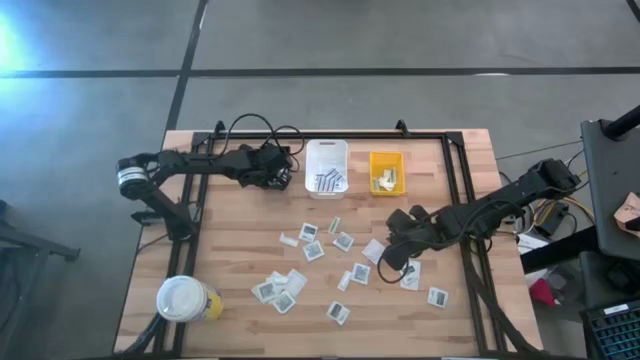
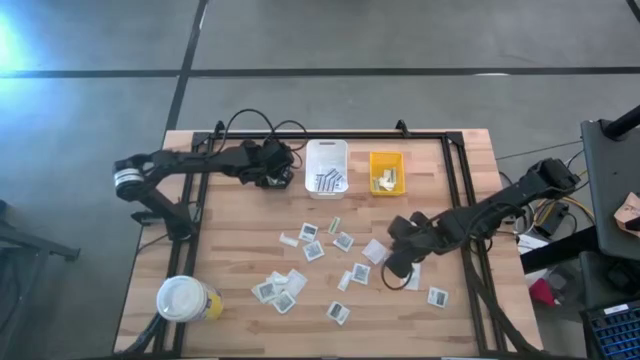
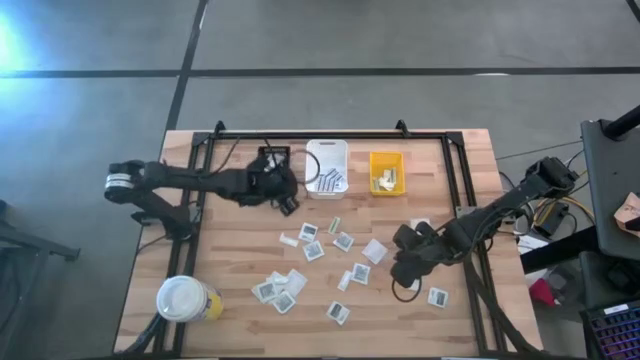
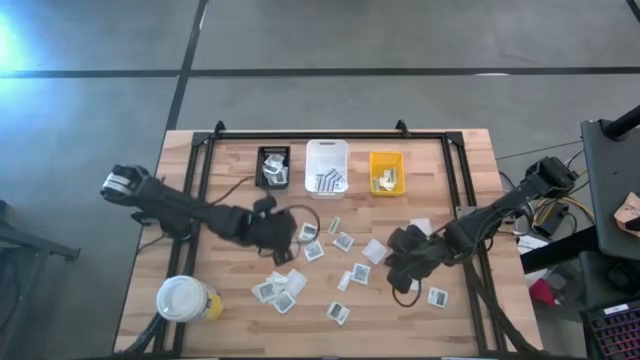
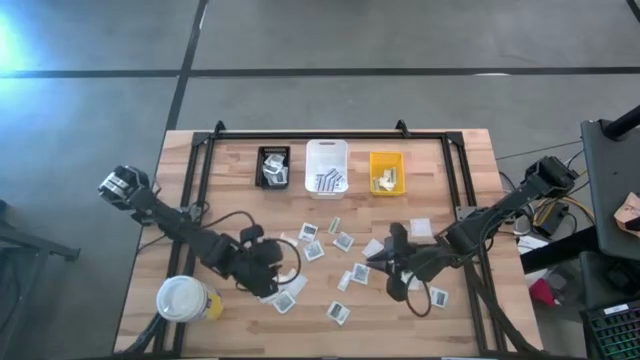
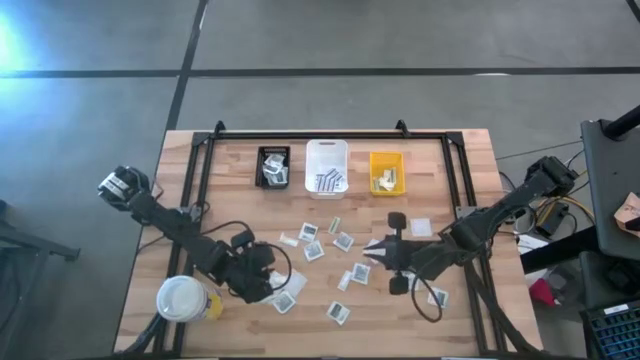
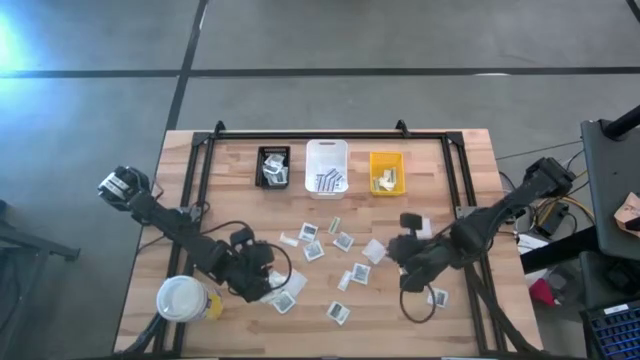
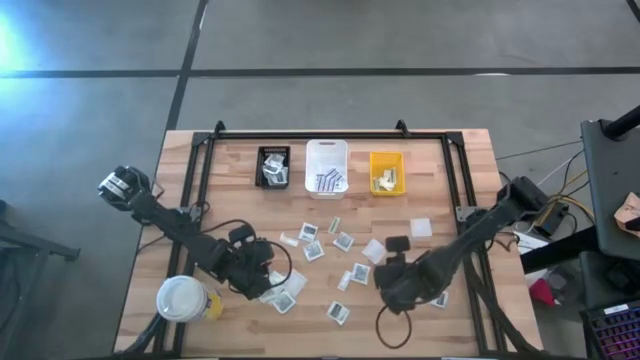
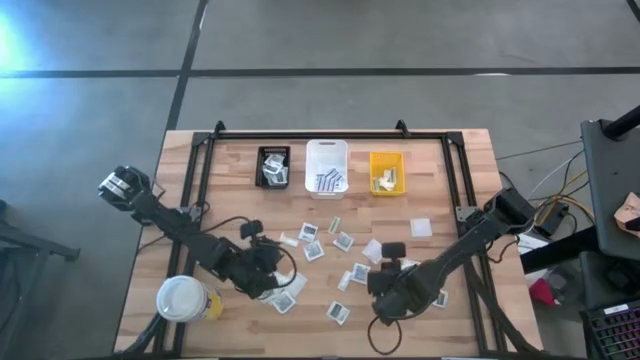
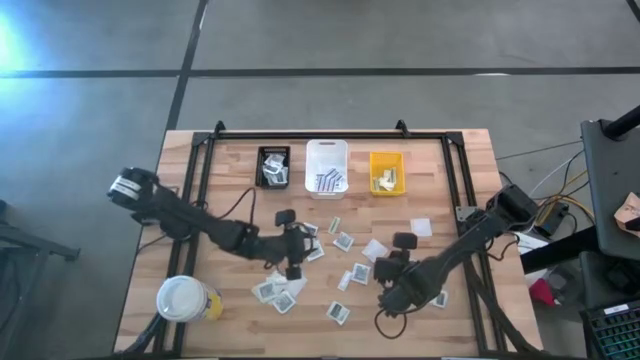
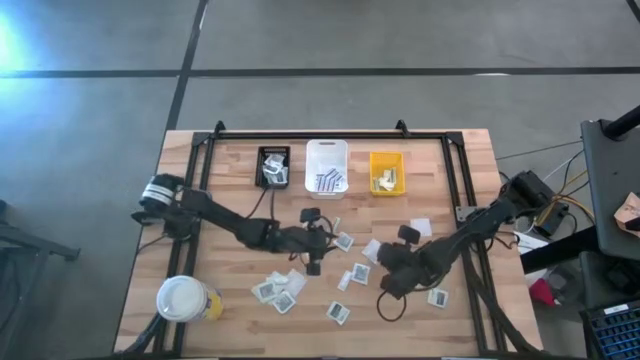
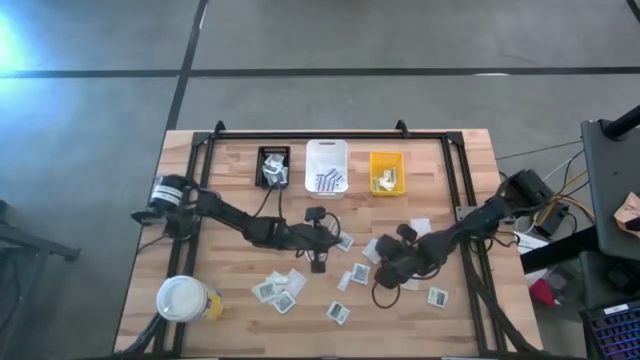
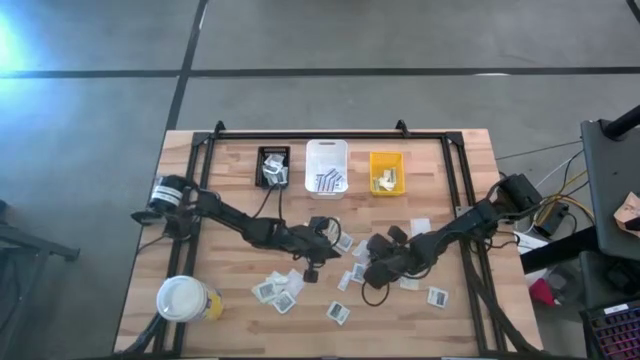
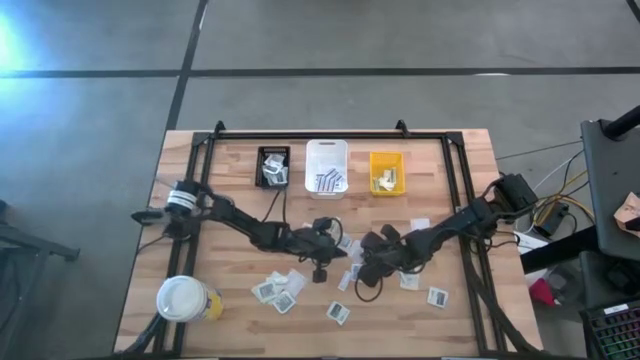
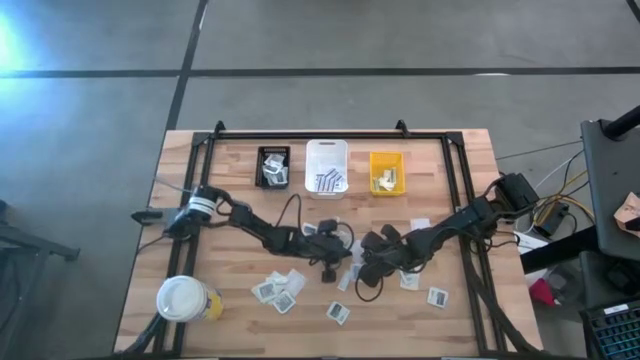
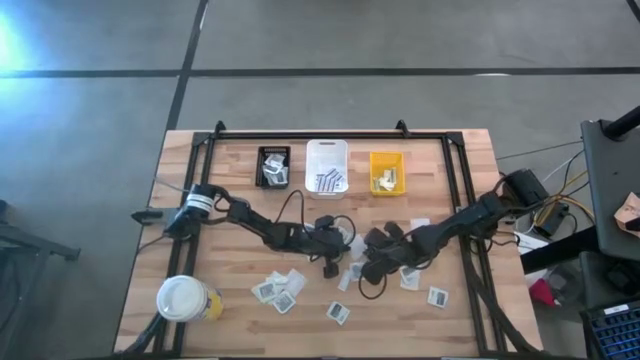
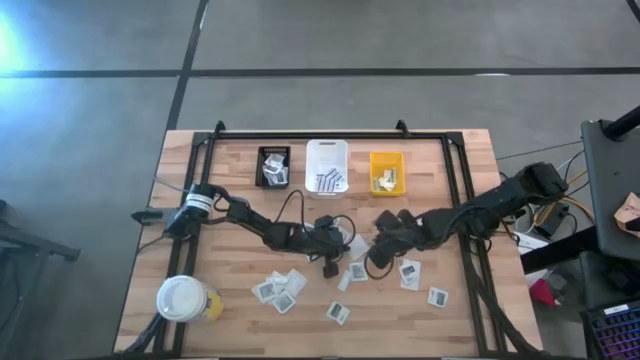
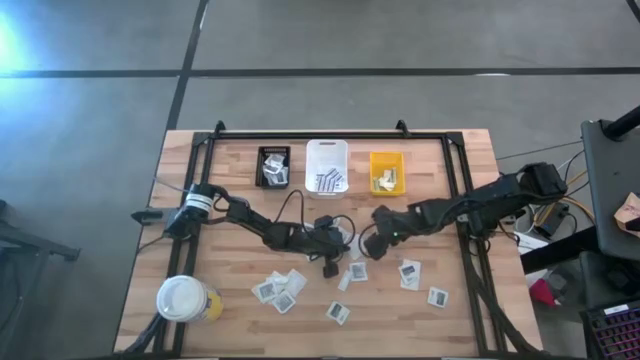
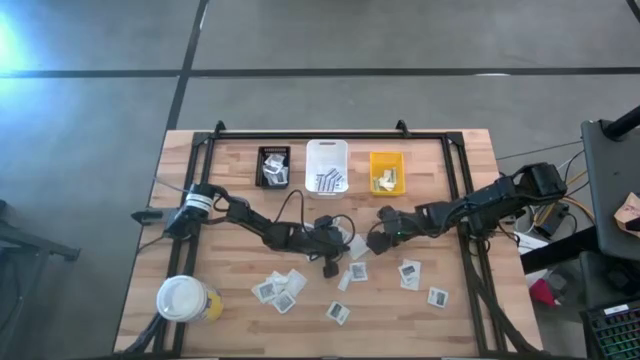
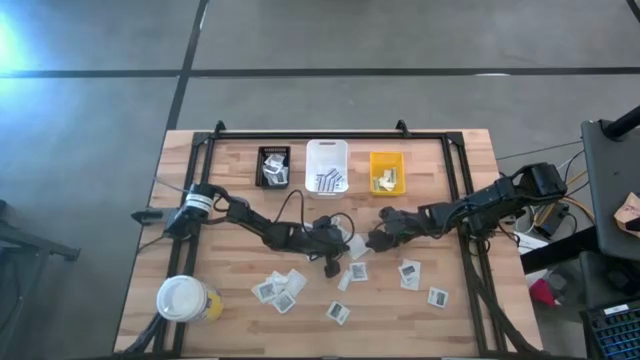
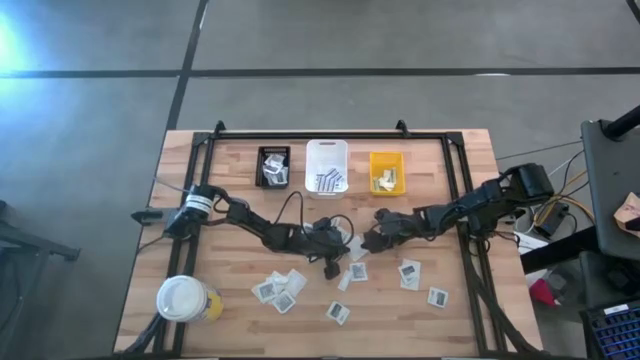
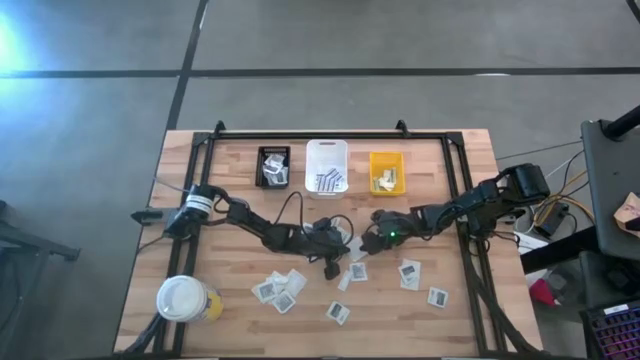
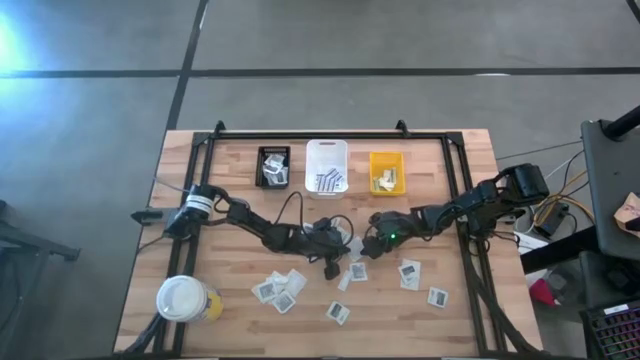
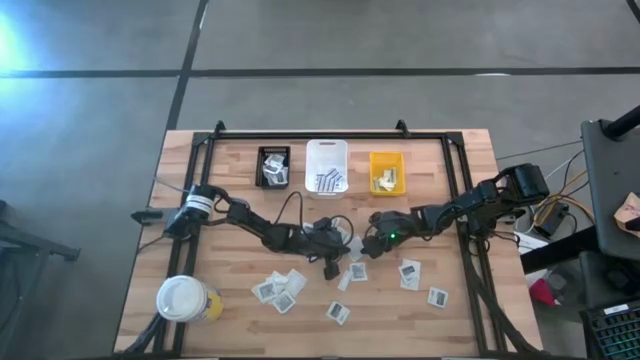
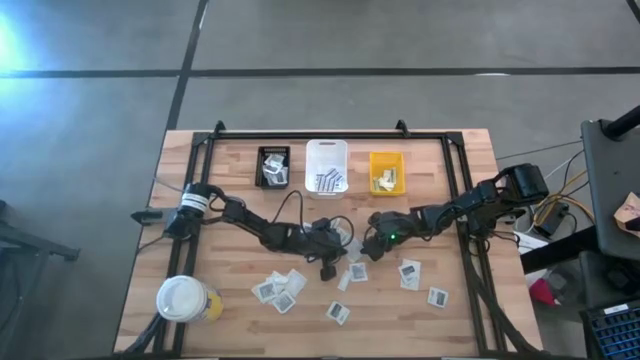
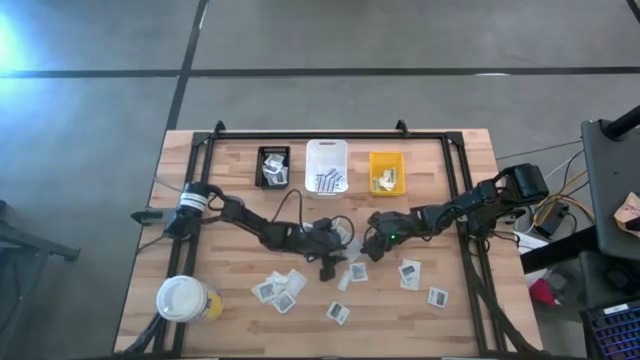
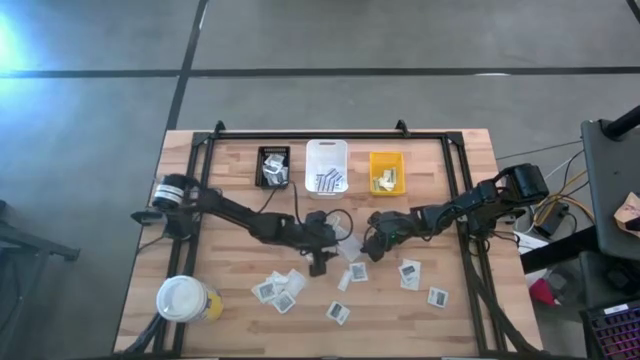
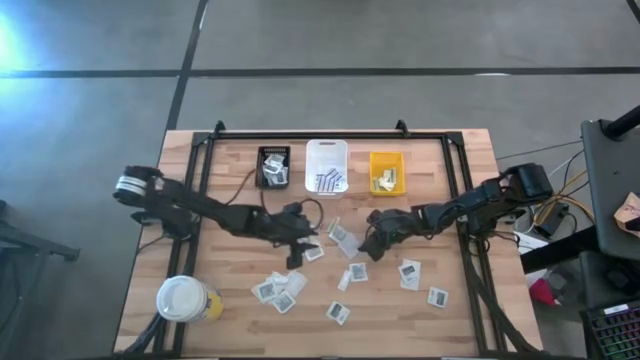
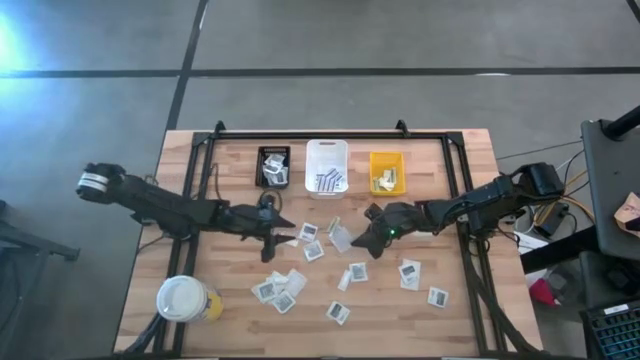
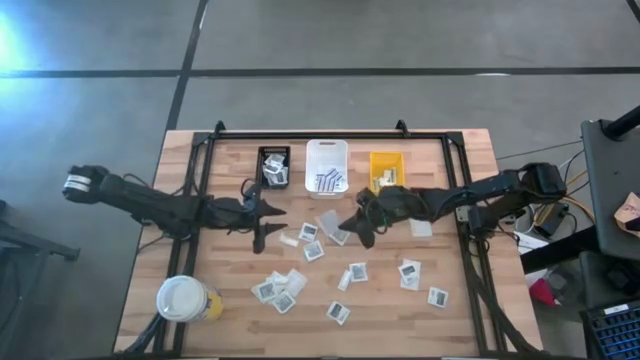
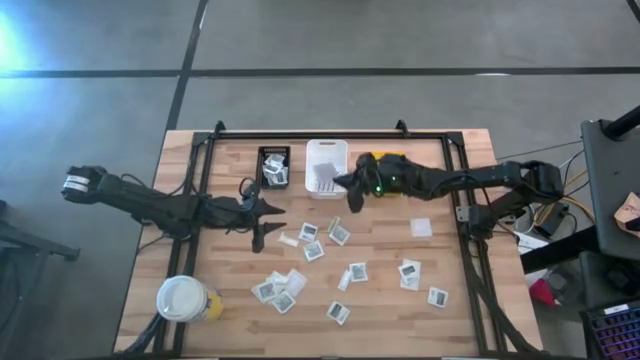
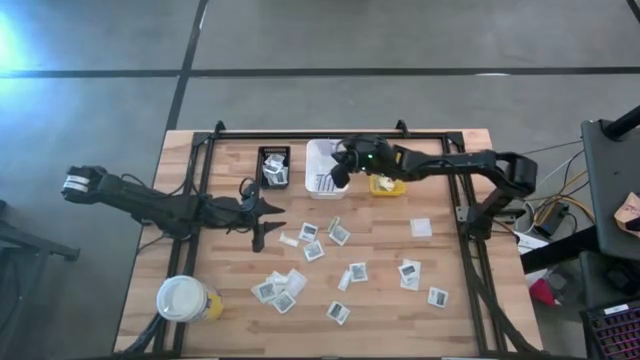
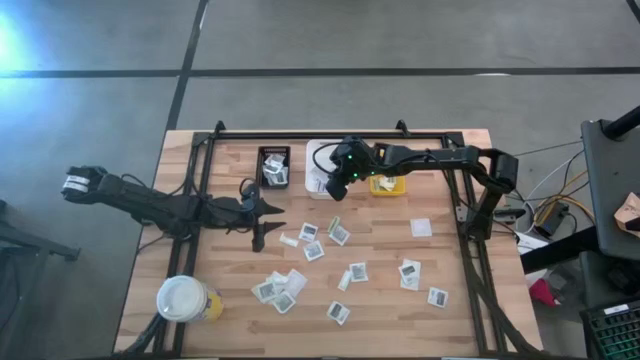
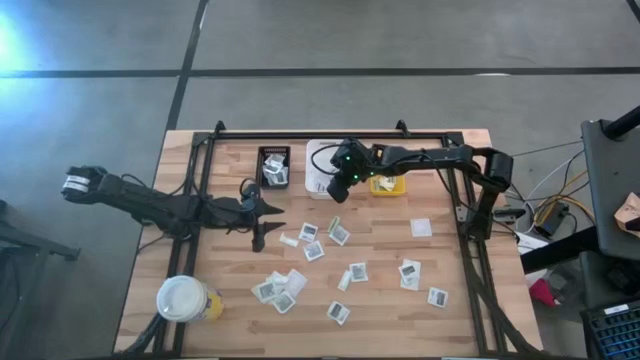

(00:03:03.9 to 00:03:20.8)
Task: Pick & Place First Aid Supplies
Put the blue bandage into the white bin

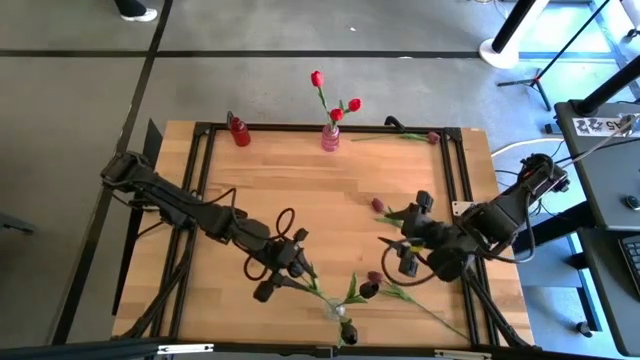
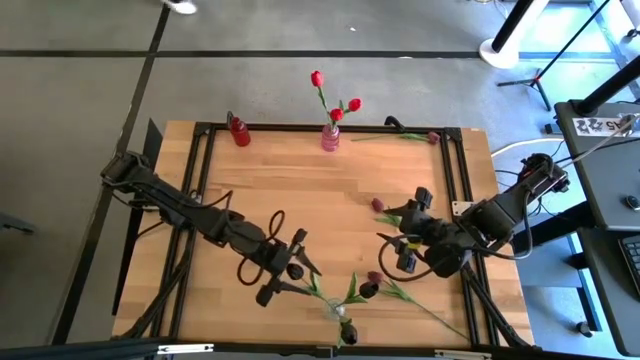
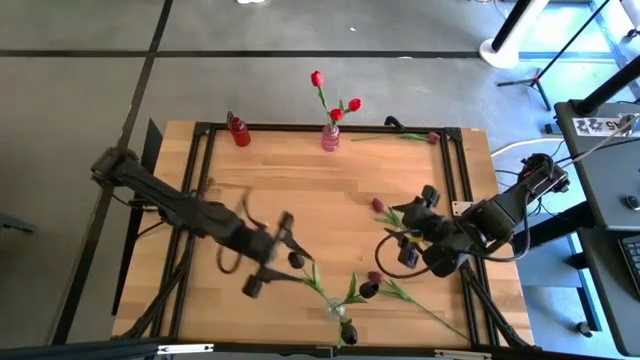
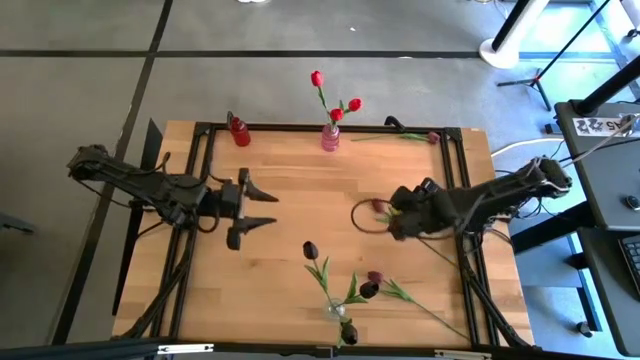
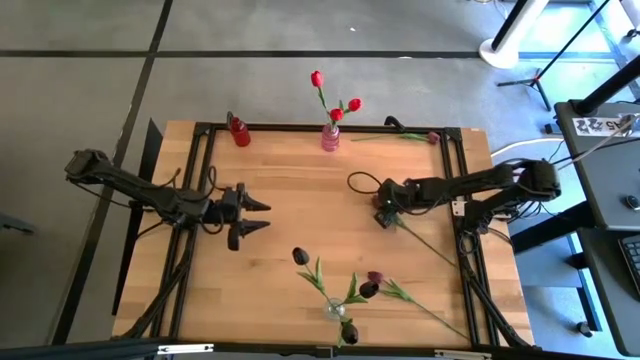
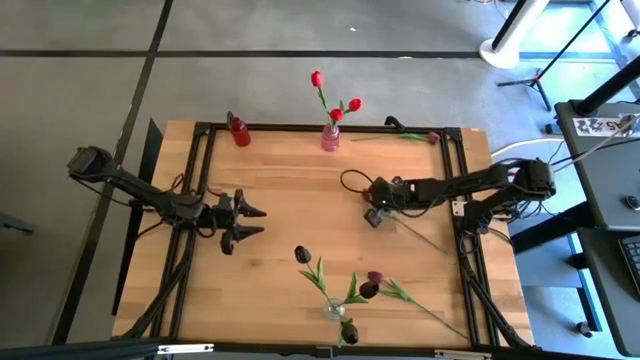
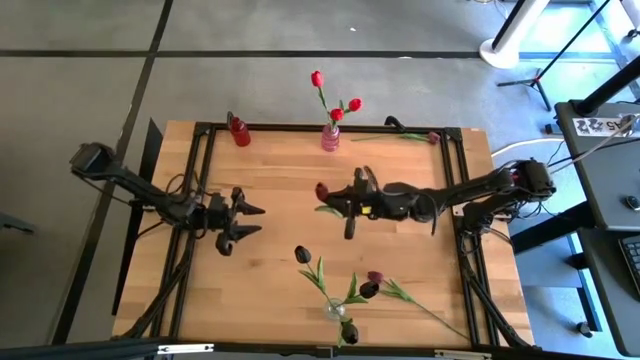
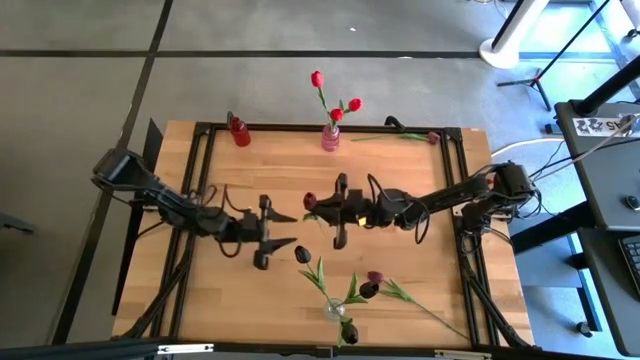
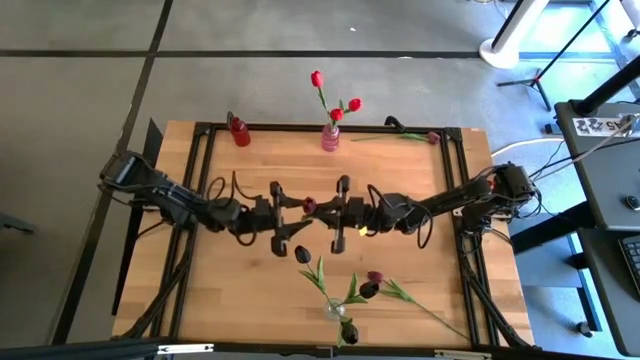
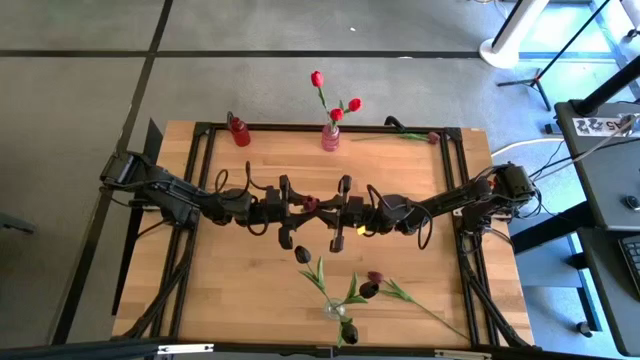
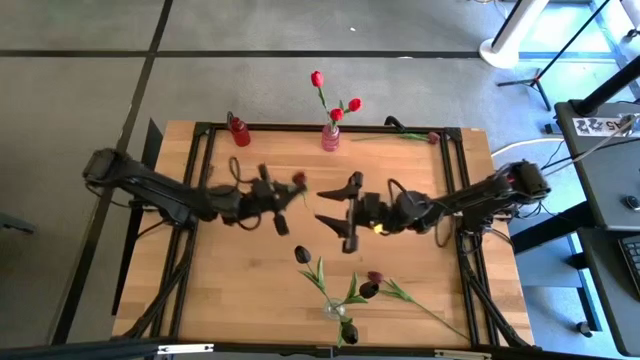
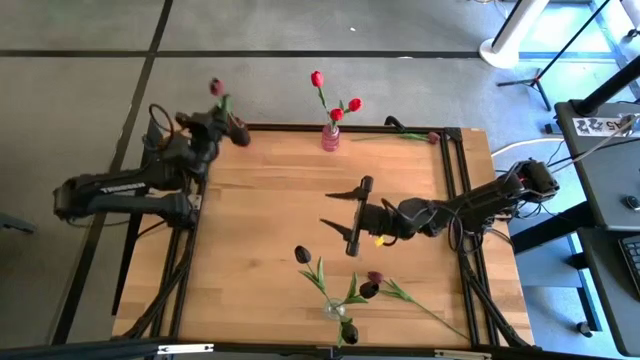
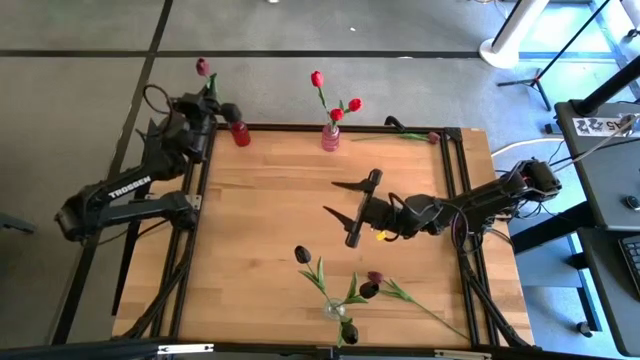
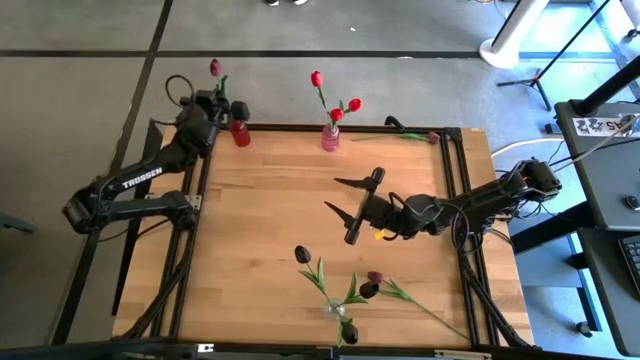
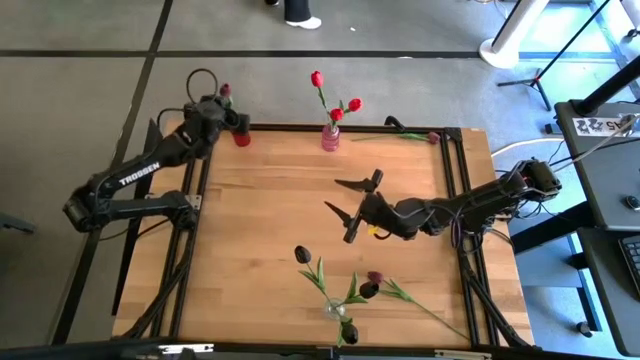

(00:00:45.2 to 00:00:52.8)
Task: Sort flowers into vase by color
Put the middle dark red flower into the red flower vase
